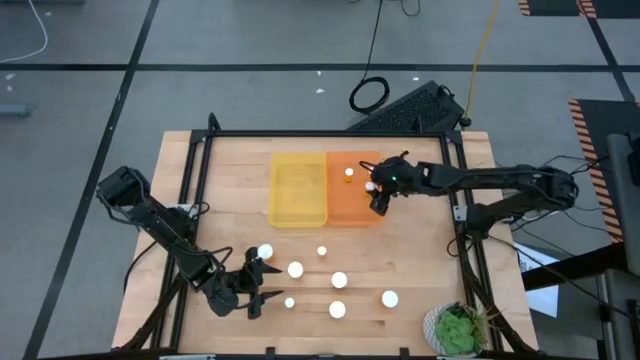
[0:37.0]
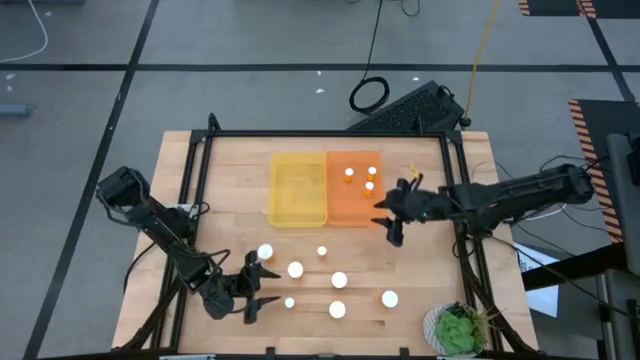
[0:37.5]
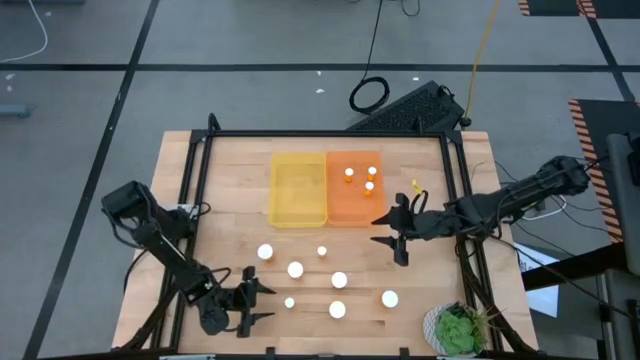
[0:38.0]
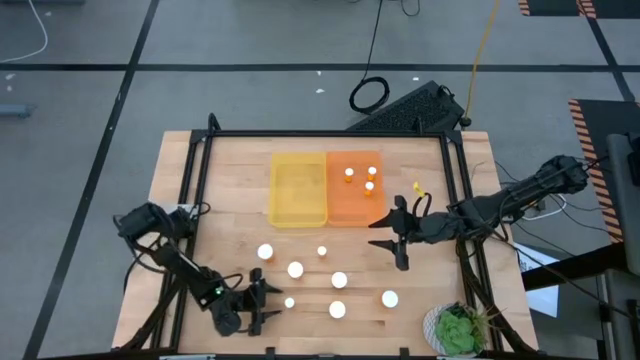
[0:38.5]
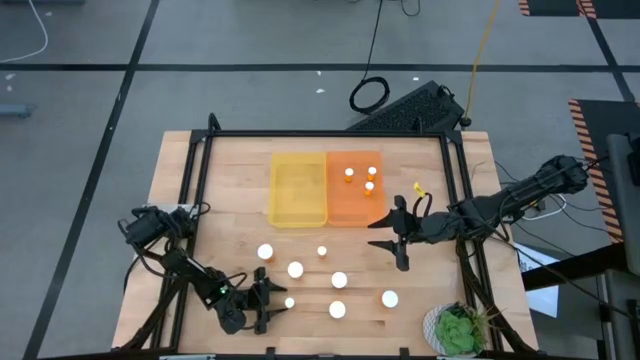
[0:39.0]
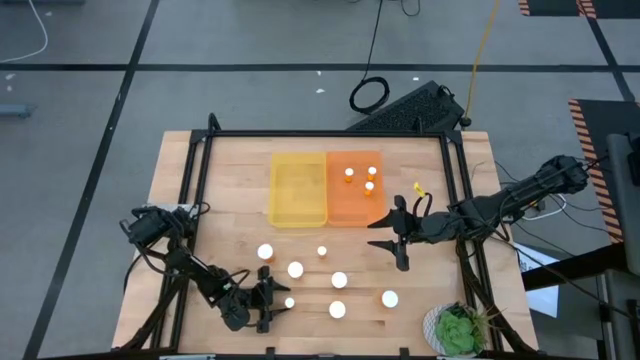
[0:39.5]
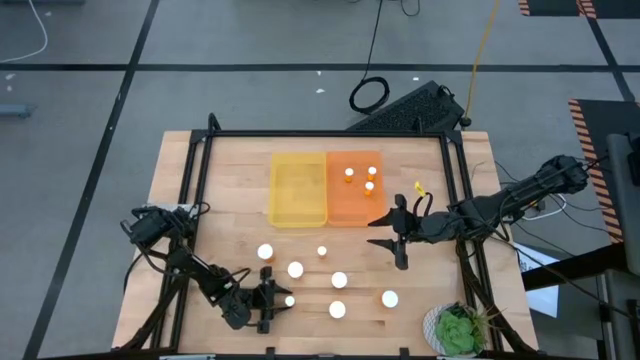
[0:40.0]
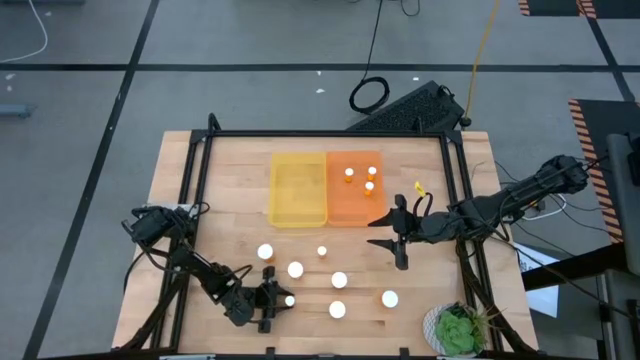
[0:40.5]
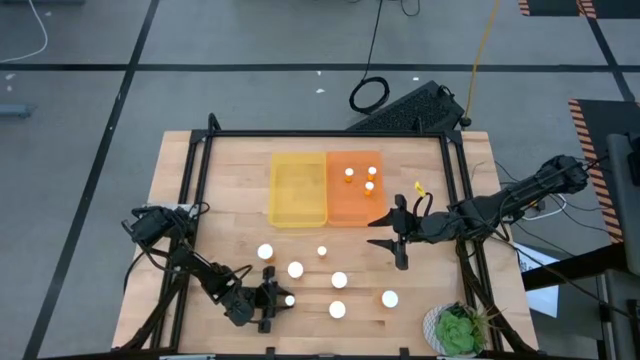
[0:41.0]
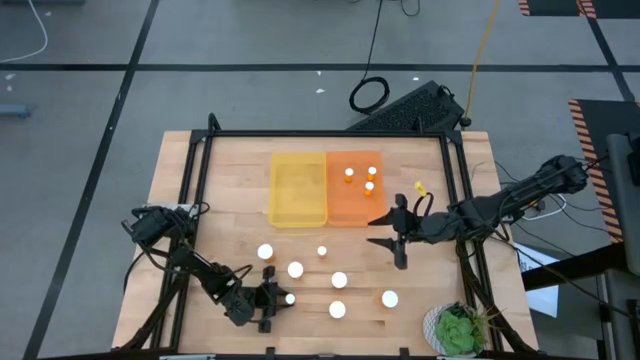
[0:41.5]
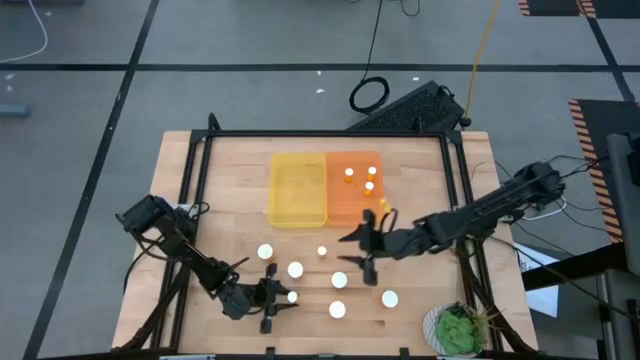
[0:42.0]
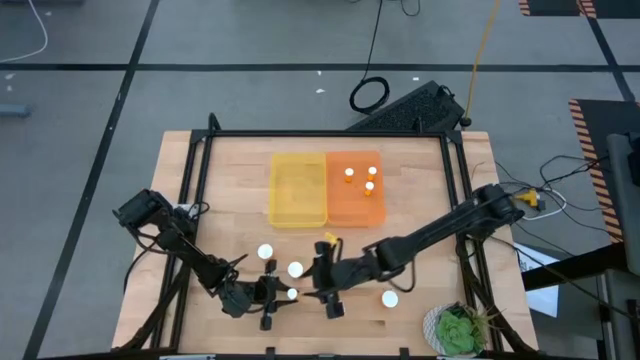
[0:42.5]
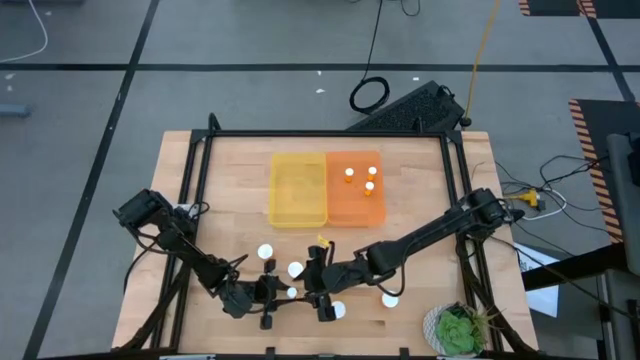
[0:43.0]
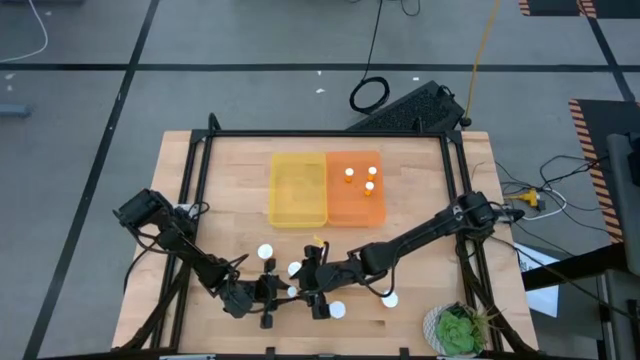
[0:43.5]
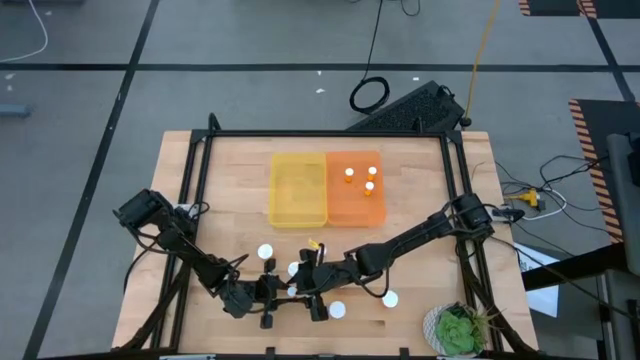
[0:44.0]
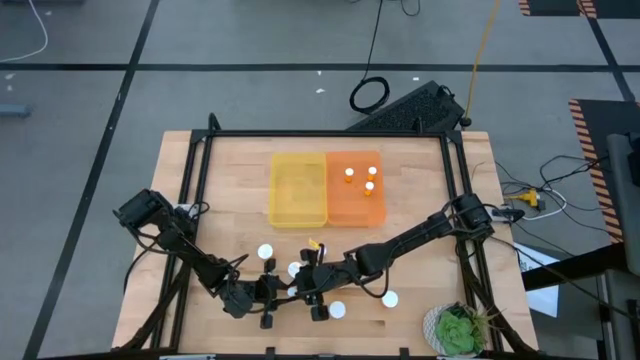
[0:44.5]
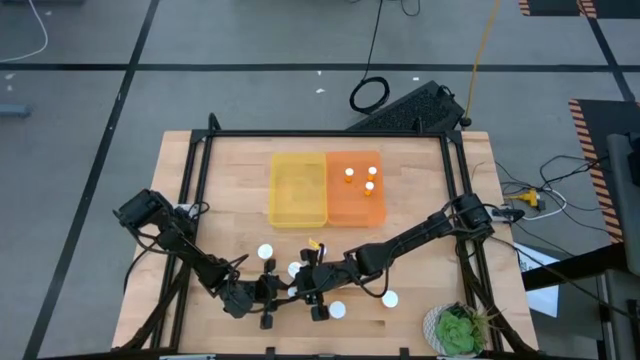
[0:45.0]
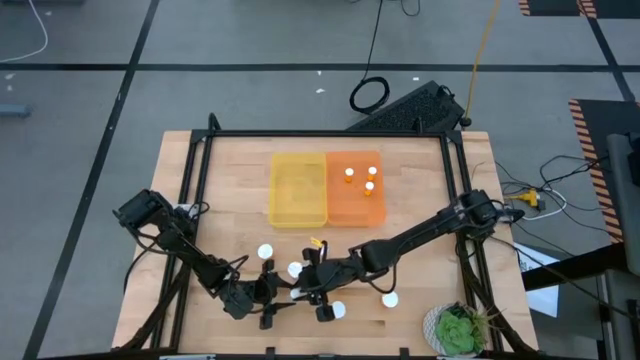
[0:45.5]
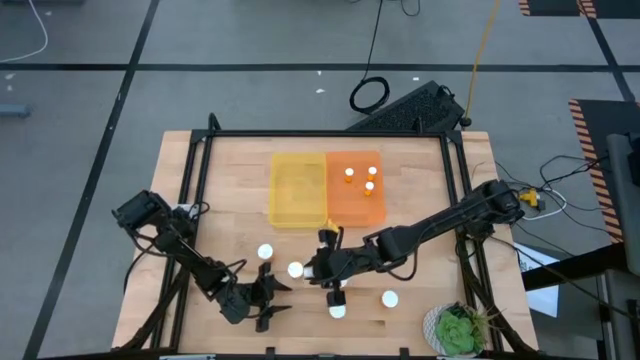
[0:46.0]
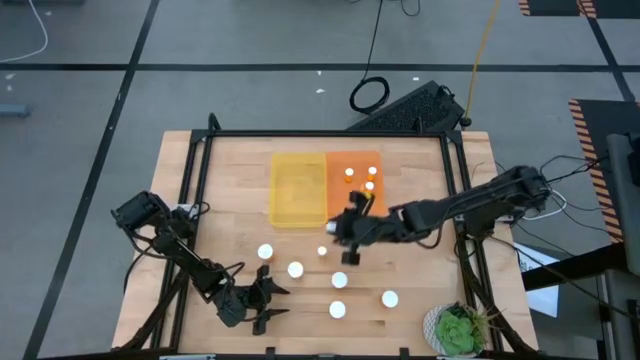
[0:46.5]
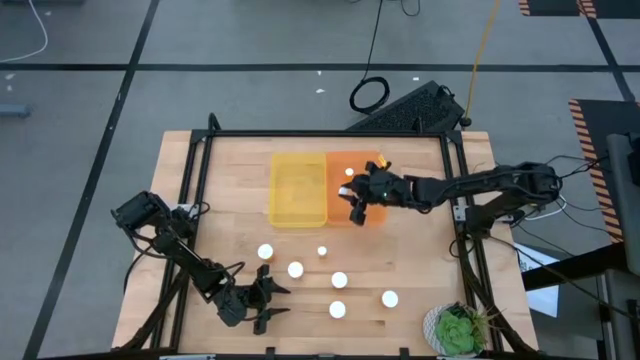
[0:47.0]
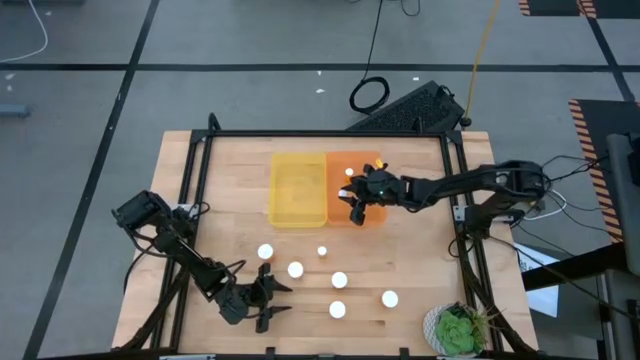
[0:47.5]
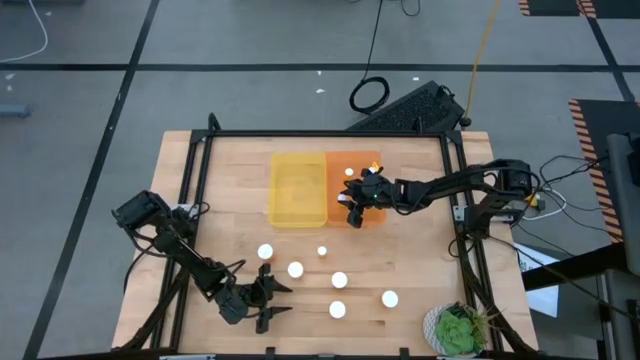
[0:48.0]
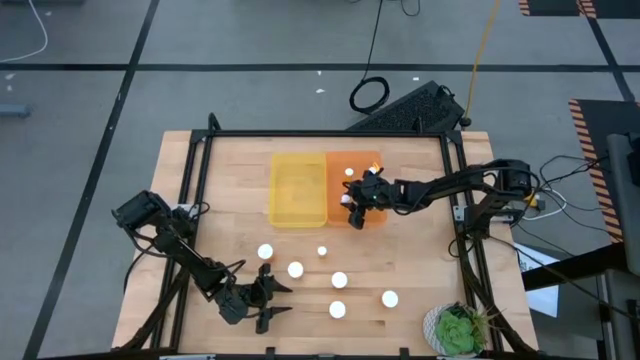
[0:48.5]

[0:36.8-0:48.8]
Task: Pick and place medicine bottles into bin by pill shape (circle, oval)
Put the small orange pill bottle into the orange bin

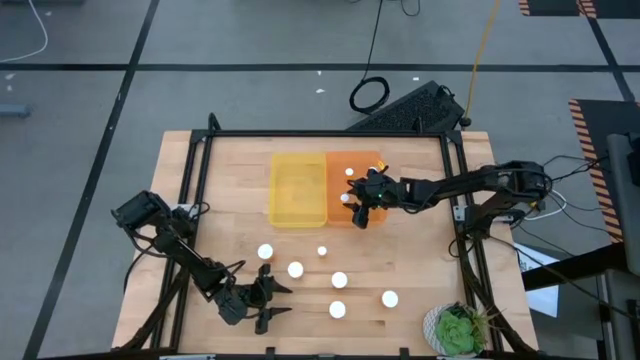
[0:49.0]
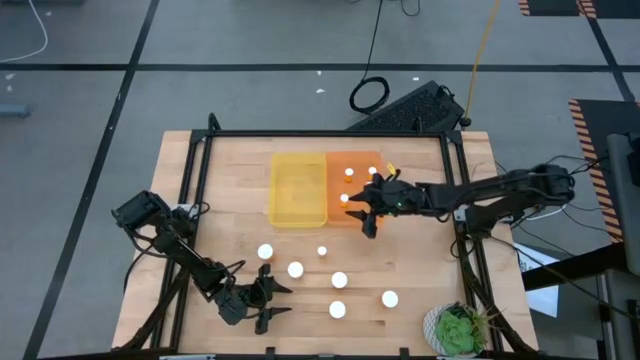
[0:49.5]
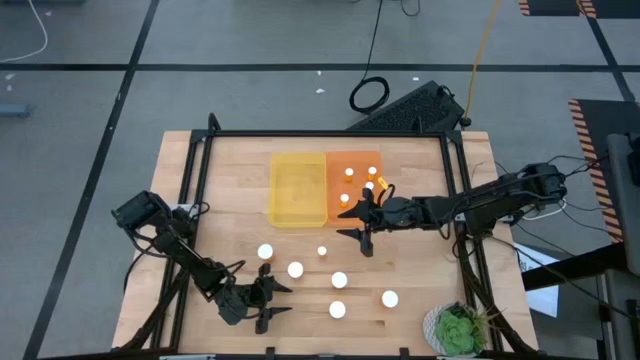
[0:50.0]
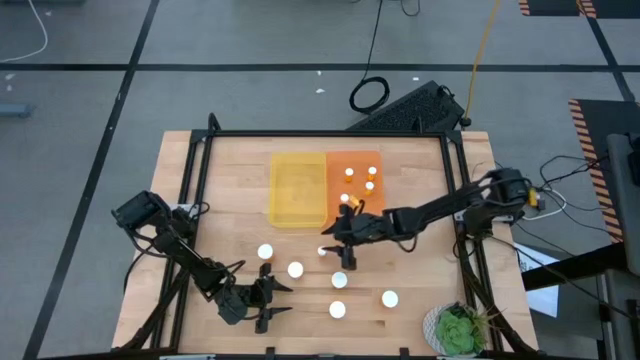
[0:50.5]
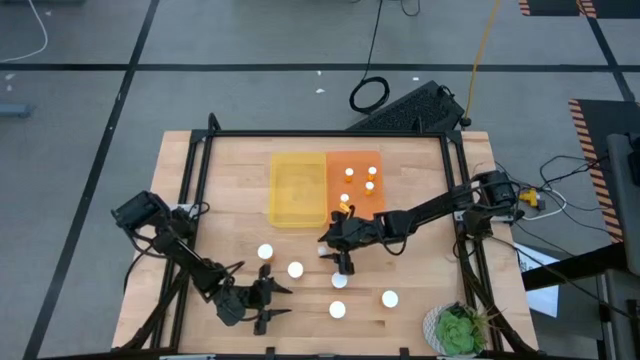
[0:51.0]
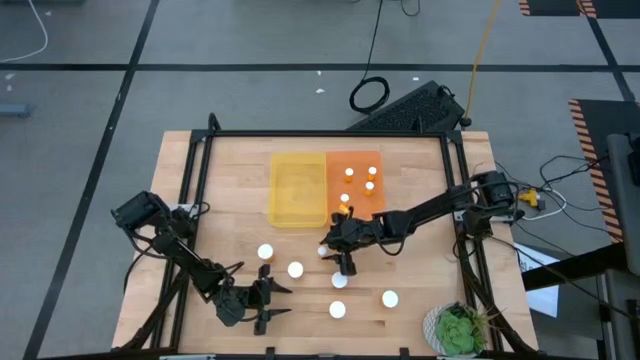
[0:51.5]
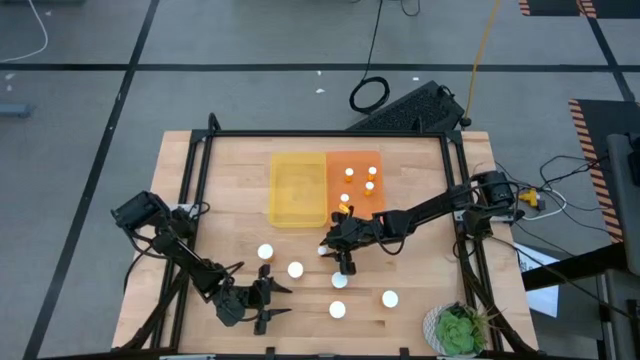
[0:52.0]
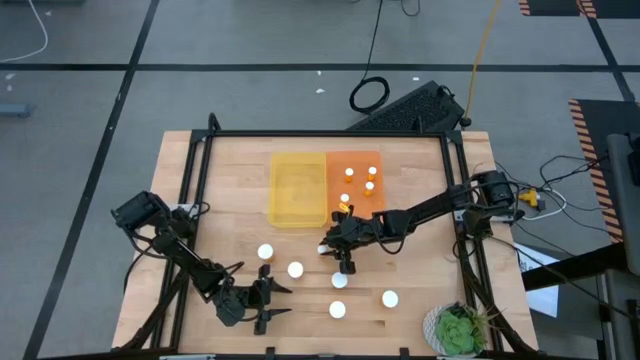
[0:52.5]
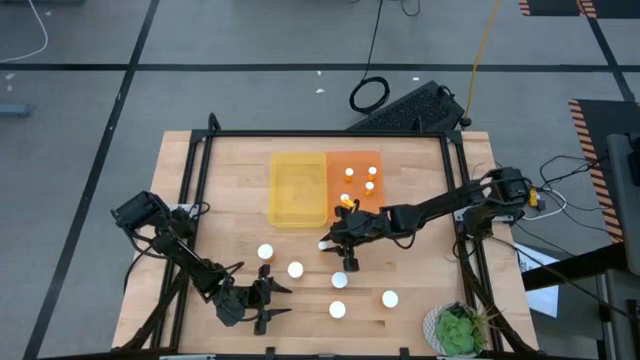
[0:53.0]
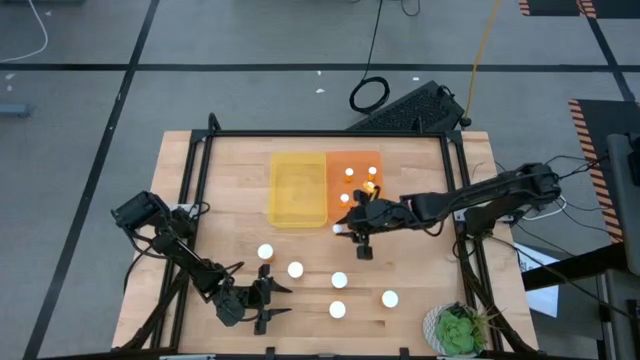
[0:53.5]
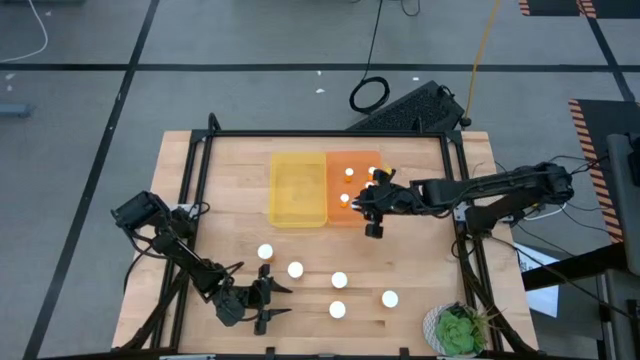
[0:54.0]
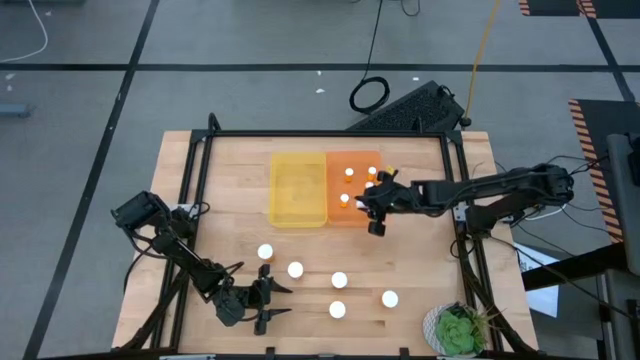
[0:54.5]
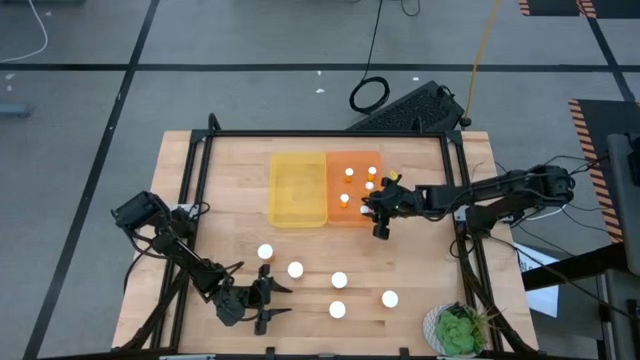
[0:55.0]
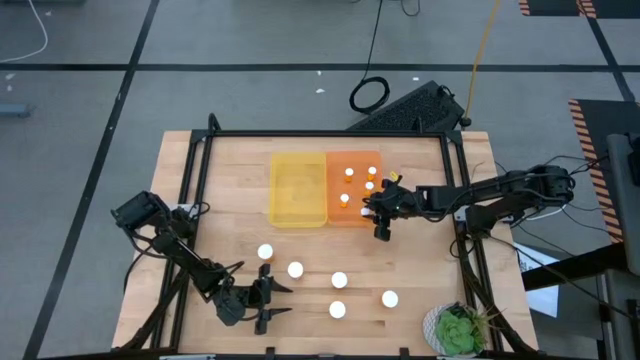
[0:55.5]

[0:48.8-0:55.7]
Put the small orange pill bottle into the orange bin

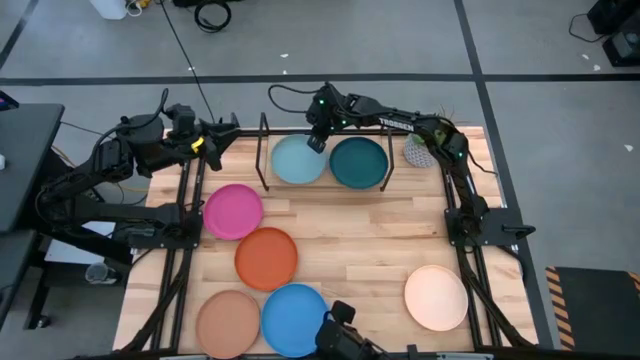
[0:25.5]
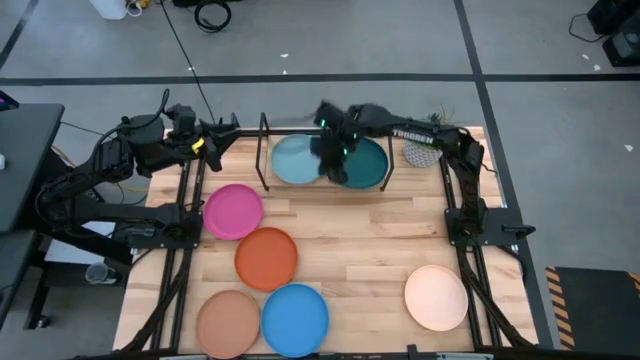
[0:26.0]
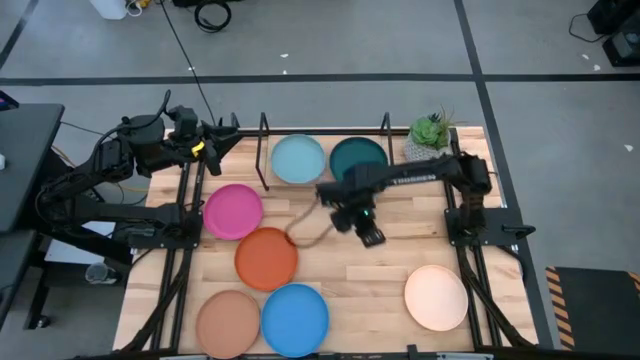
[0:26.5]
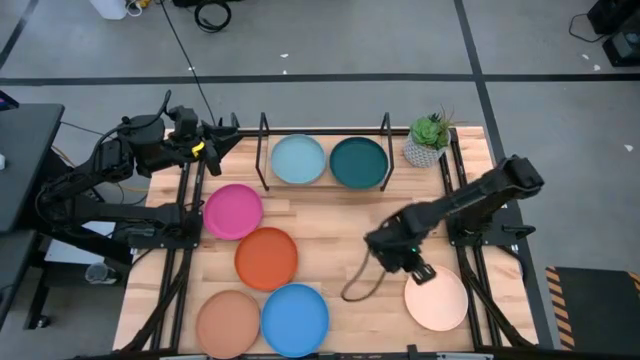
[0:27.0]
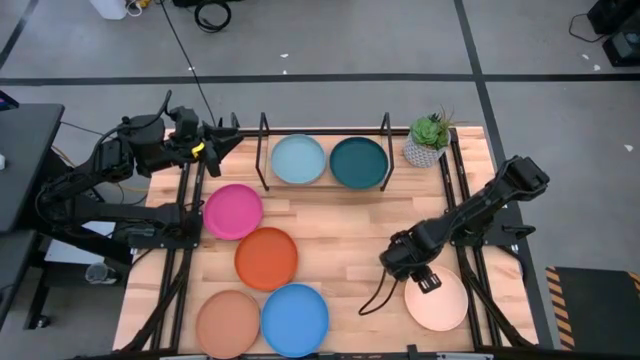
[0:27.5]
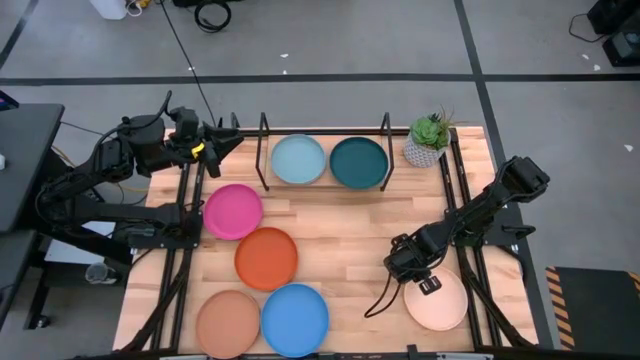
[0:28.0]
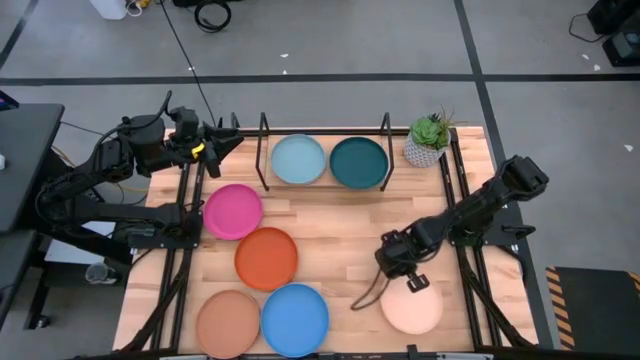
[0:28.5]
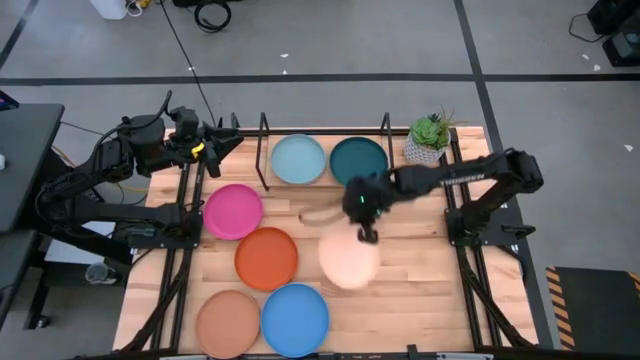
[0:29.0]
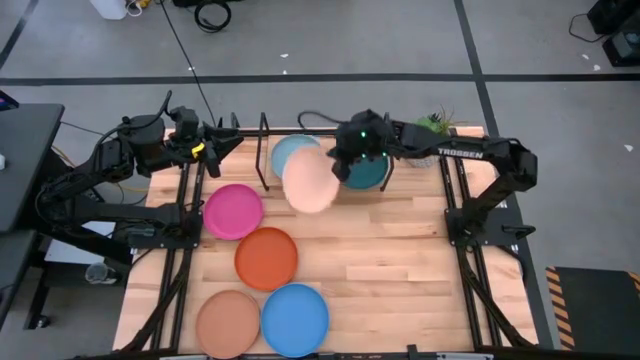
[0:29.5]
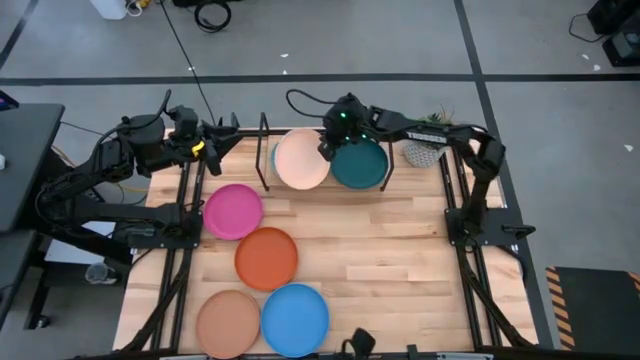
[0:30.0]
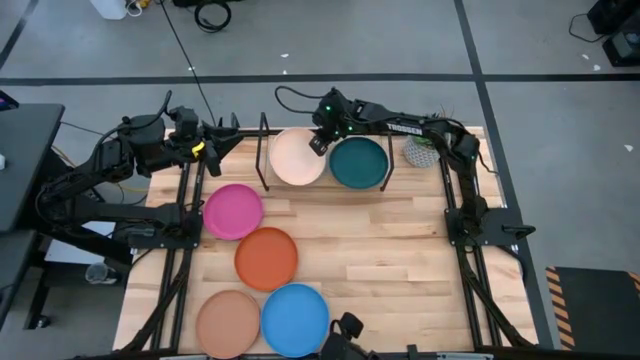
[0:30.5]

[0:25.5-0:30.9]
Task: Place and stack plates onto a shelf
Stack the white plate on top of the light blue plate on the shelf
